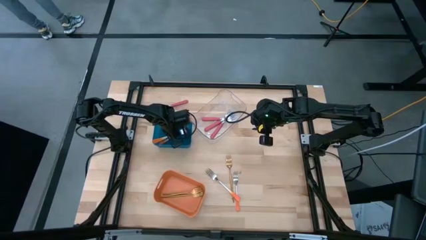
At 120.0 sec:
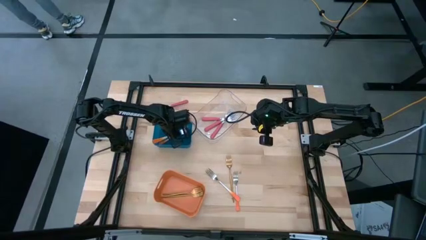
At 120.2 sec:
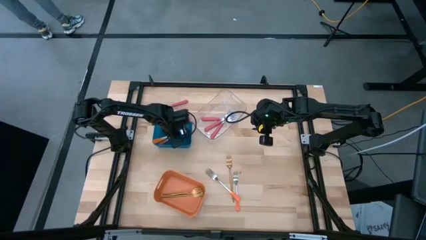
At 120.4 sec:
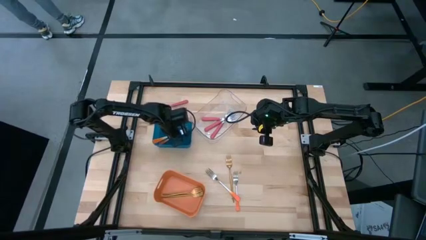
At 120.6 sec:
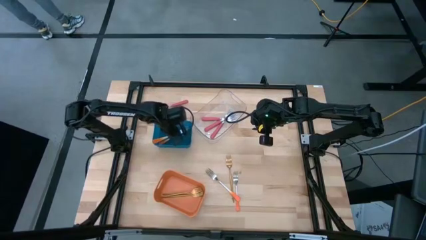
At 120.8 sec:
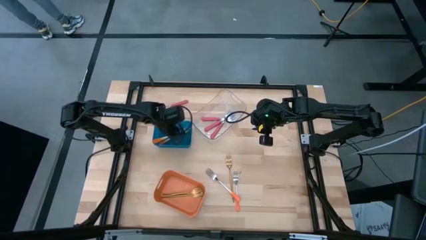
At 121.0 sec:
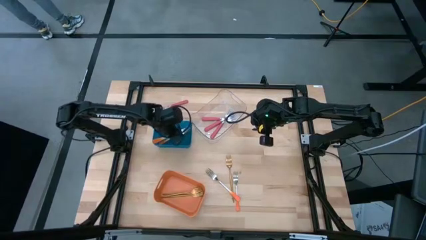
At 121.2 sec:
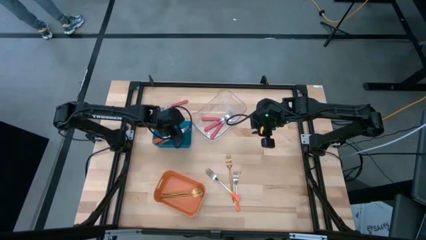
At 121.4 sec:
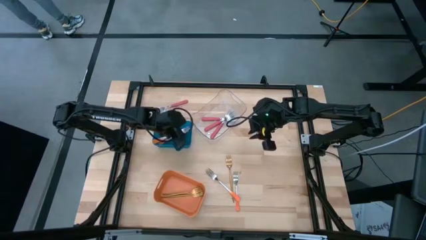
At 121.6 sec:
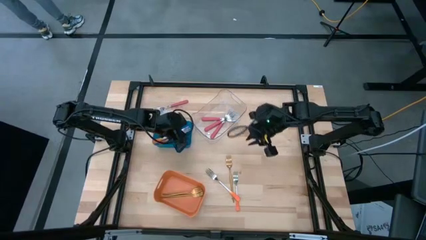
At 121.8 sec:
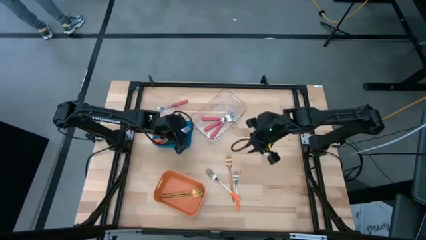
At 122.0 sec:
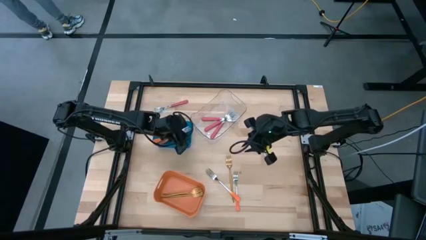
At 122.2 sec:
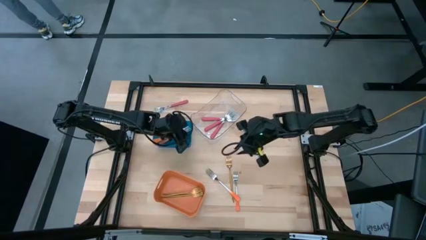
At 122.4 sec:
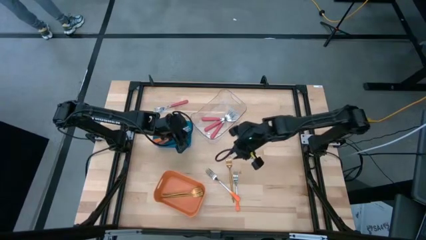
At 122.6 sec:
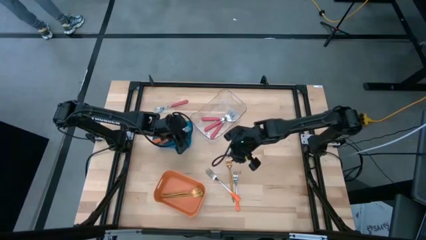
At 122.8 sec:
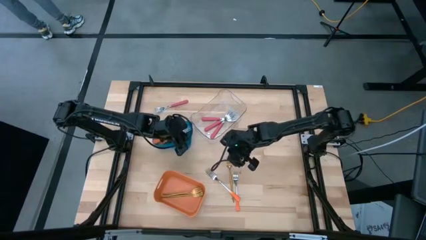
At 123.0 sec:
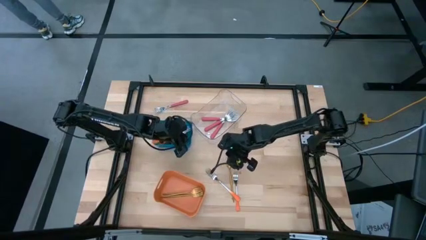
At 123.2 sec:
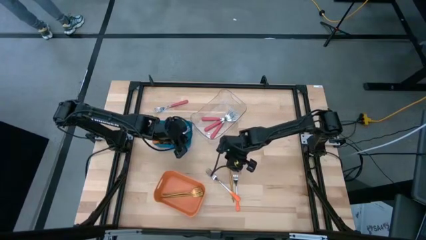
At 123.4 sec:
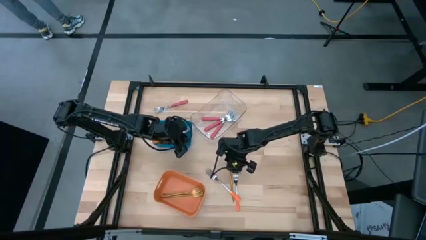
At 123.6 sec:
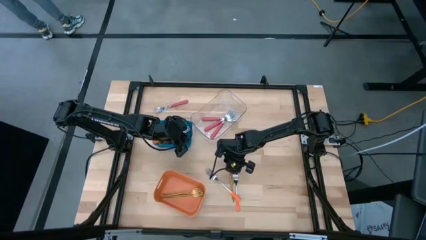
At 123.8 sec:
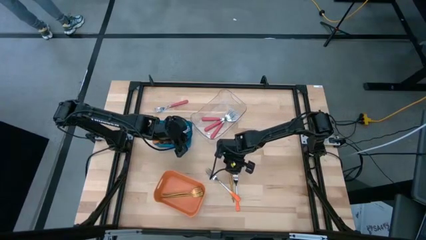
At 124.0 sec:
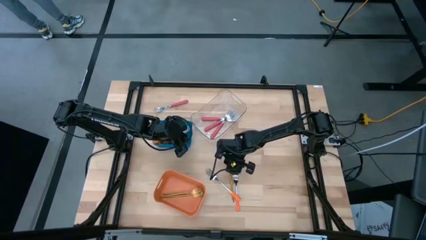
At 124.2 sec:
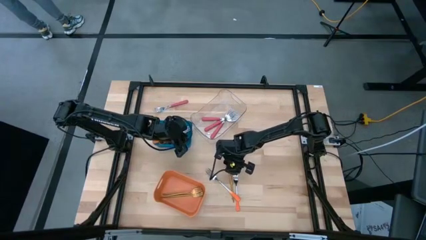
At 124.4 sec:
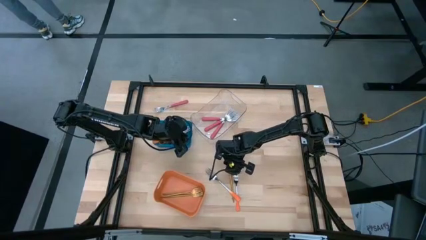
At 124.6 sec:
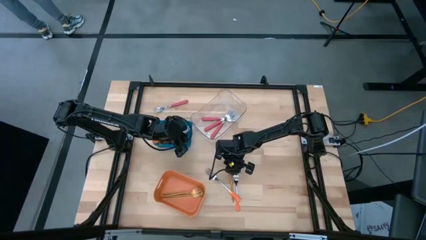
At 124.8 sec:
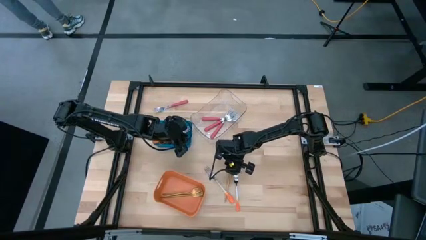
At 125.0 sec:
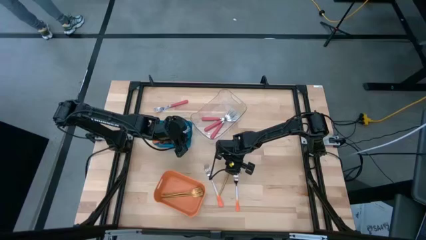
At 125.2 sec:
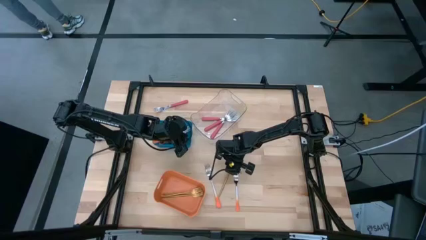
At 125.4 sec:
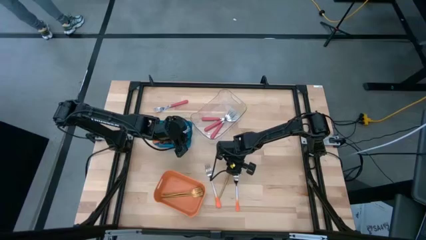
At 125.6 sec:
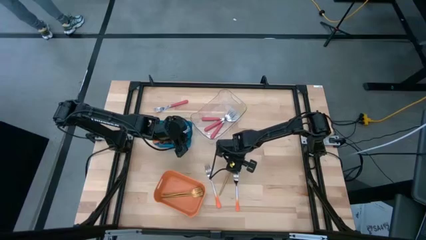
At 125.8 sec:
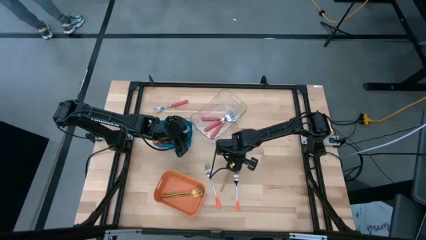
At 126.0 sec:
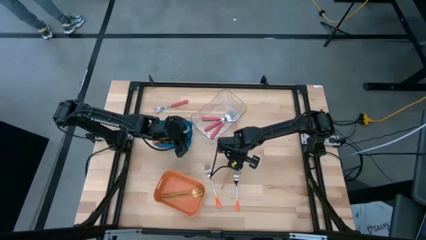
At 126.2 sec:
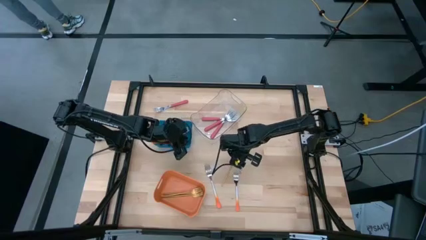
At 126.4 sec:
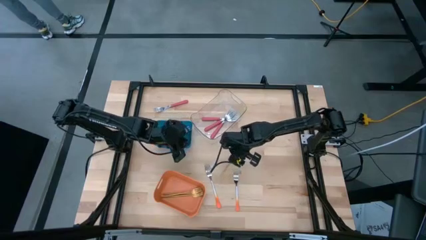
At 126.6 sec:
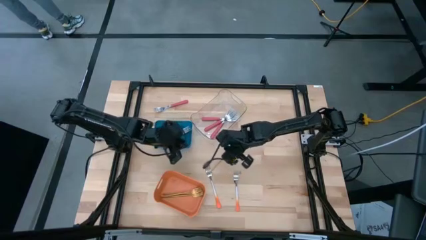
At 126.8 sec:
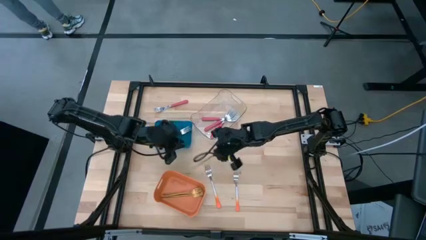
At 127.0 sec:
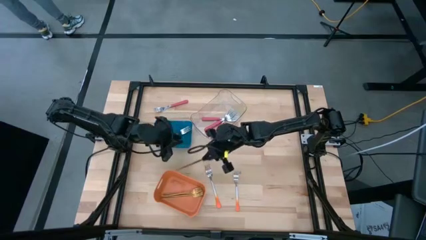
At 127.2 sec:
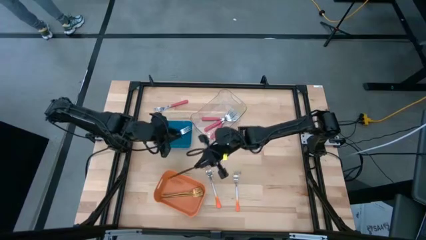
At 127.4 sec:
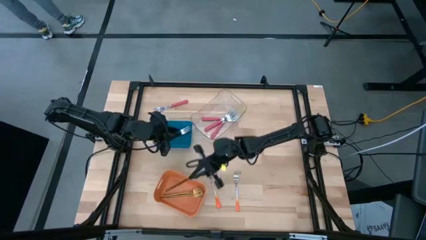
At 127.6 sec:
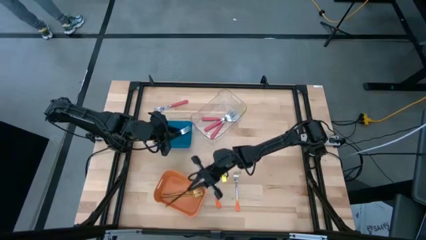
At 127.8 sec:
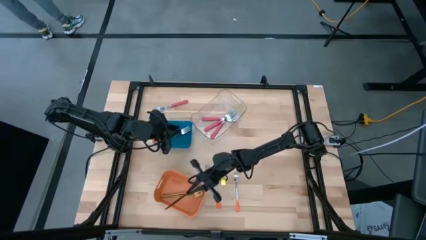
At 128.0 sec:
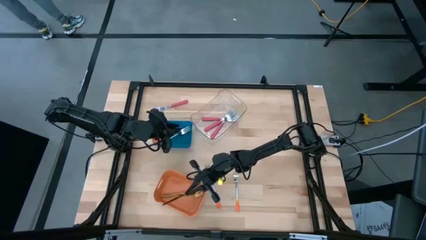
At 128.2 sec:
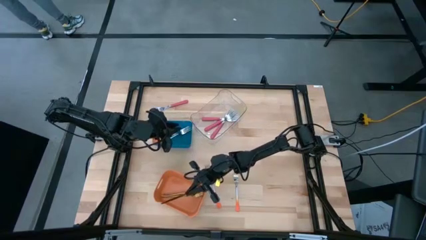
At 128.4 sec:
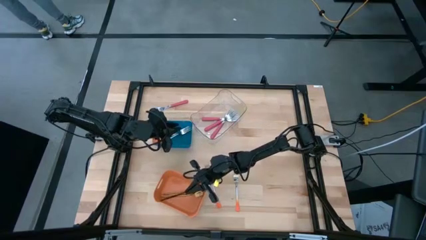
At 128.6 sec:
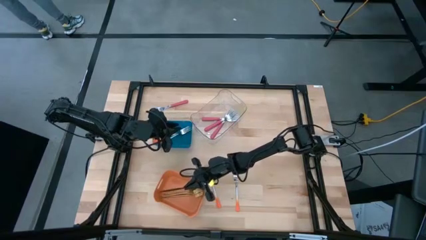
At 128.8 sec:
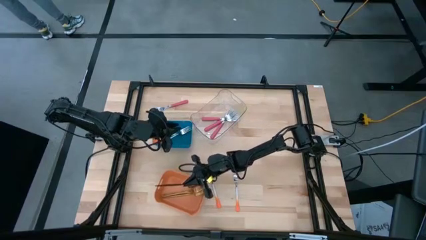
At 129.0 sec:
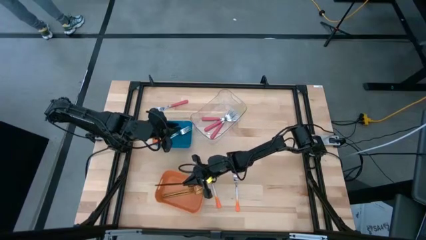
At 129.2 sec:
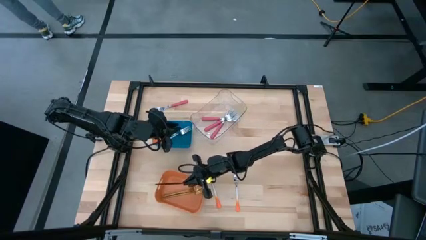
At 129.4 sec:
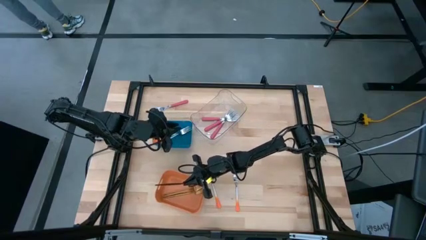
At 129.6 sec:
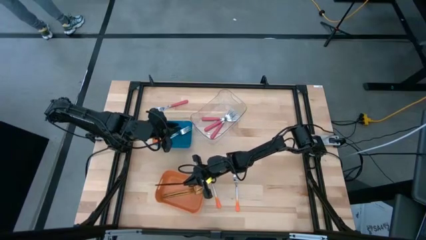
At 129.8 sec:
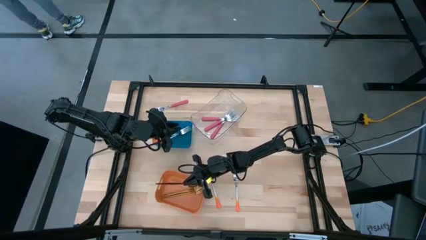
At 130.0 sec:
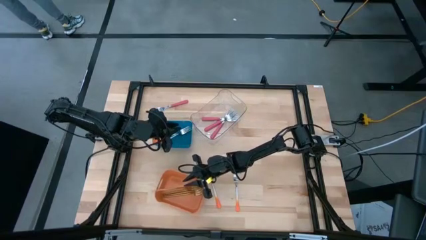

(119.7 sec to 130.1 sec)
Task: Sort silverware by color (type)
Put the gold fork into the orange bin

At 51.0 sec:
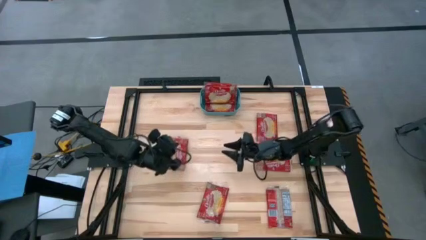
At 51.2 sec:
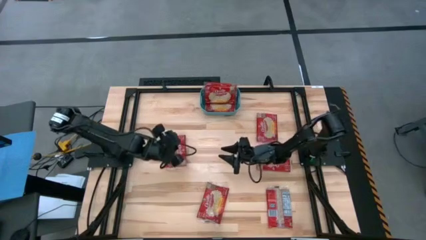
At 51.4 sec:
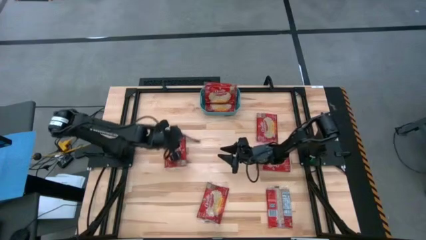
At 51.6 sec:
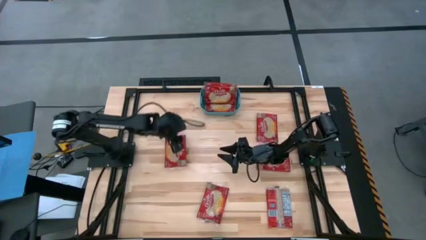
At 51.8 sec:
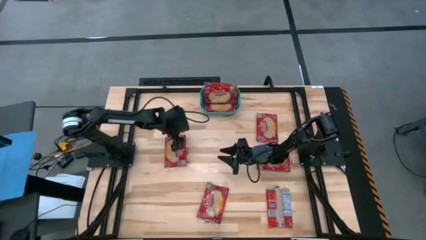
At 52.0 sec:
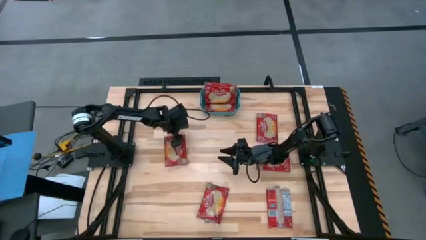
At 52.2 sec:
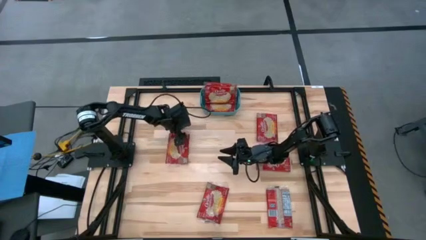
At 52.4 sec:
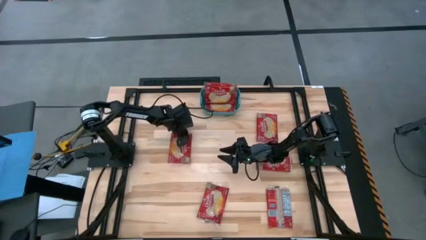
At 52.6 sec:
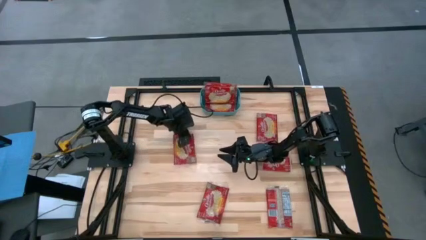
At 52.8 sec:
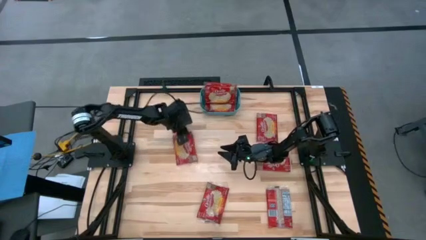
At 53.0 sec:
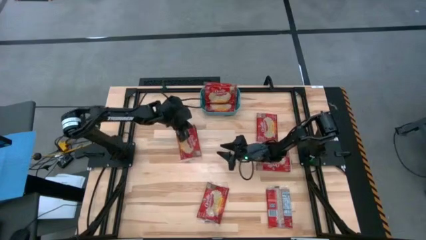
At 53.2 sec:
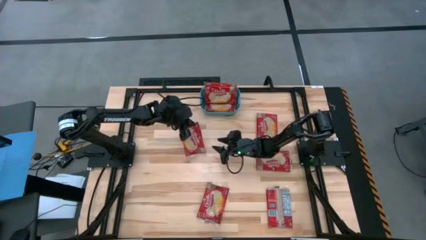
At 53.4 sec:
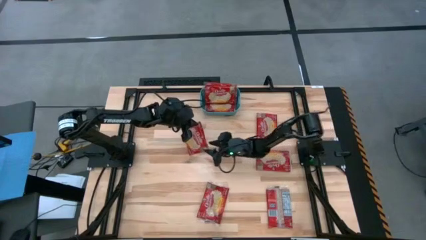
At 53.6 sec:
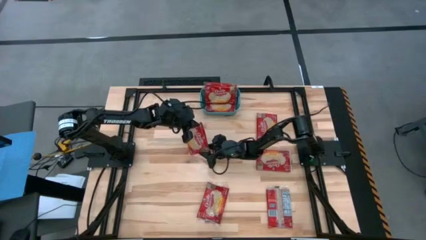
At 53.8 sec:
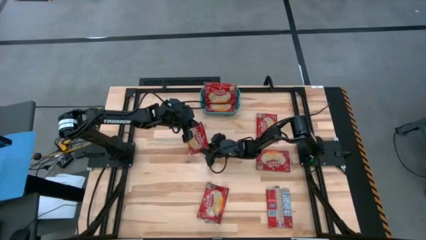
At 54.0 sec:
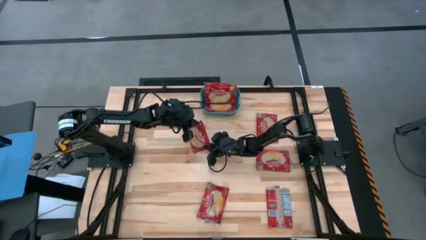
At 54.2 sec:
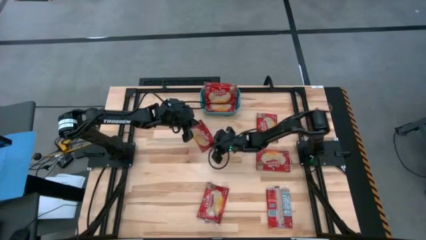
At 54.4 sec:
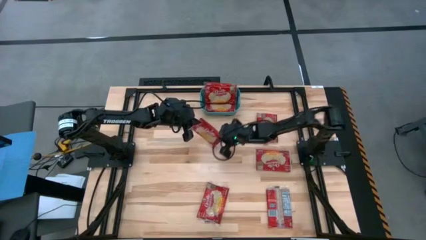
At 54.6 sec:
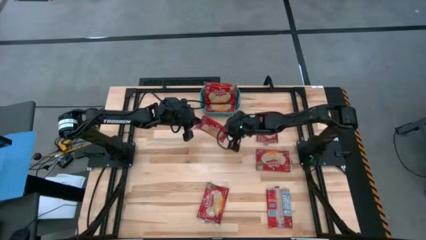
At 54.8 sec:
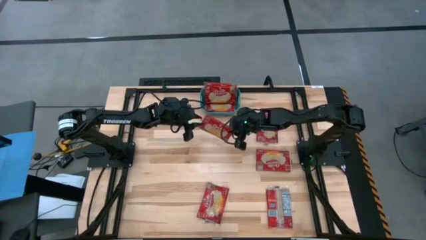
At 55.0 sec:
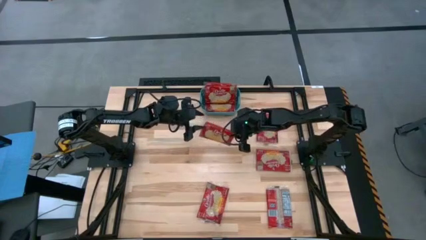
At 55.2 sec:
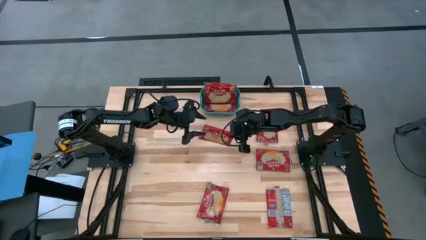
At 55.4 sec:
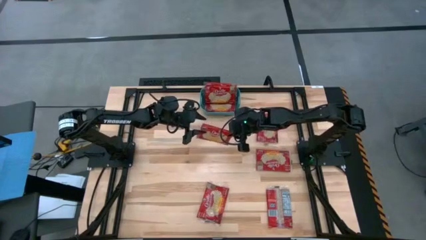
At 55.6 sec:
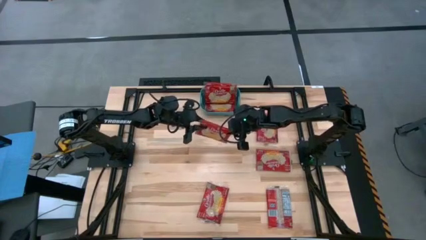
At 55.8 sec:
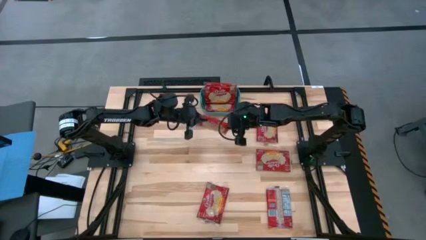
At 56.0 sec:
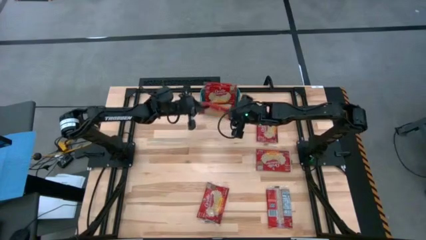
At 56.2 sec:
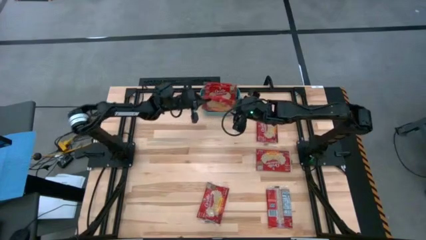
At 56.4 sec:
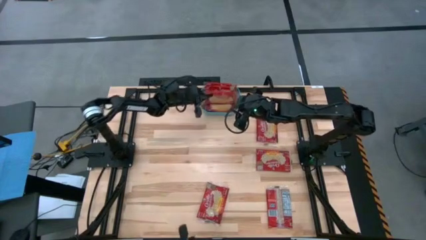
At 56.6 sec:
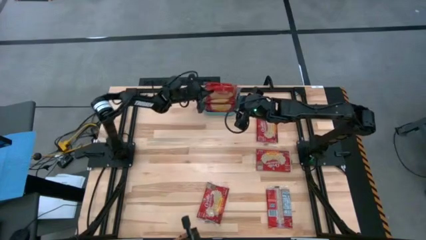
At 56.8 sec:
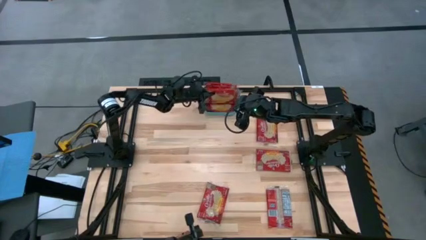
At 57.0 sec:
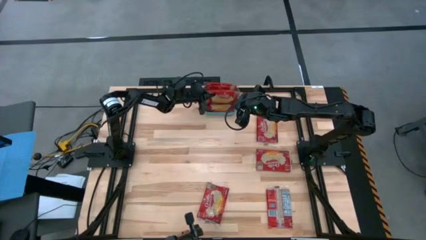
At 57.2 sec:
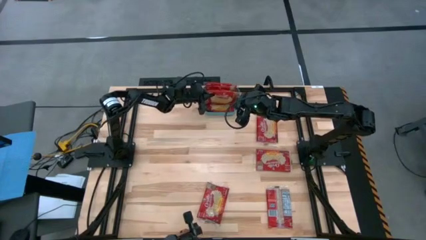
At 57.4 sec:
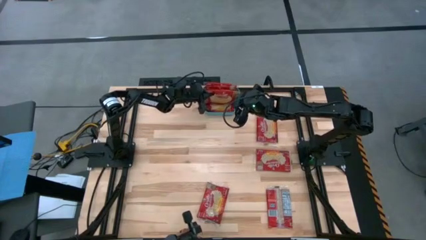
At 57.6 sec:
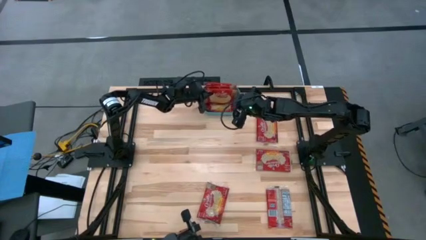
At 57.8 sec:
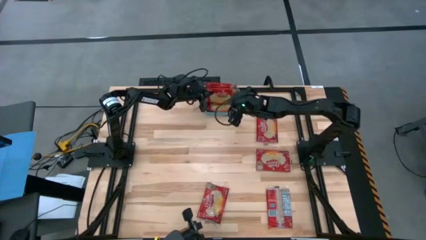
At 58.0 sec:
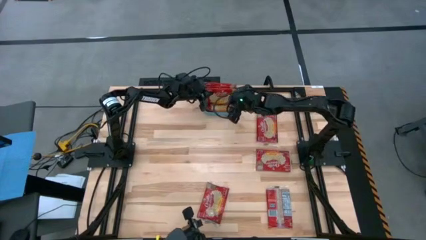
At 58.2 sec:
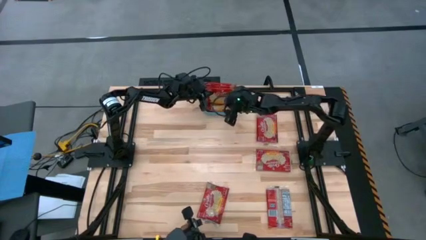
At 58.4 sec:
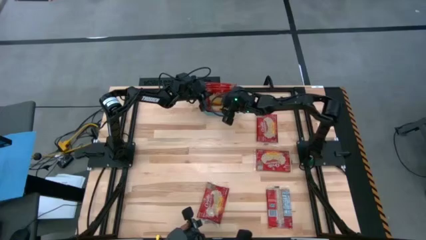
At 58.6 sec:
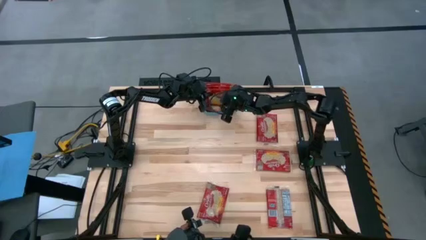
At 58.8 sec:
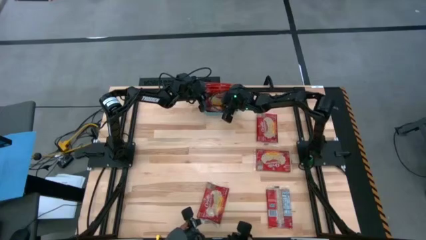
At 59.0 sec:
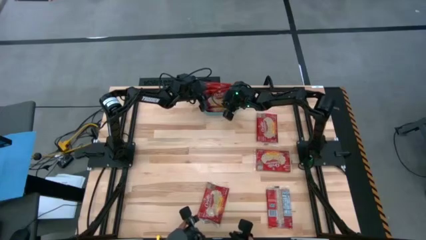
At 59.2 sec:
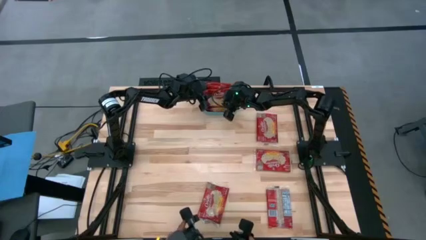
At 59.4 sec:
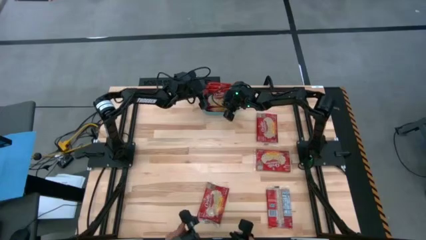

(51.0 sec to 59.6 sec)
Task: Sort popcorn bags into baskets
Put the red popcorn bag into the blue bin
